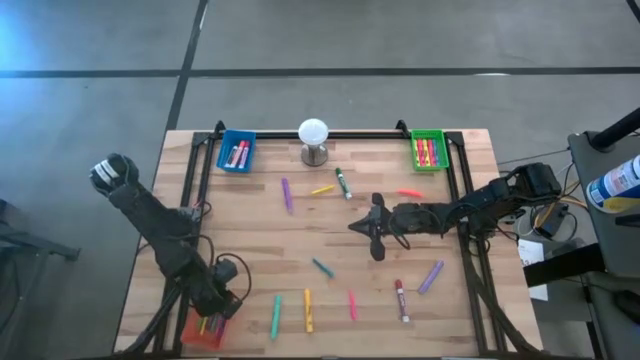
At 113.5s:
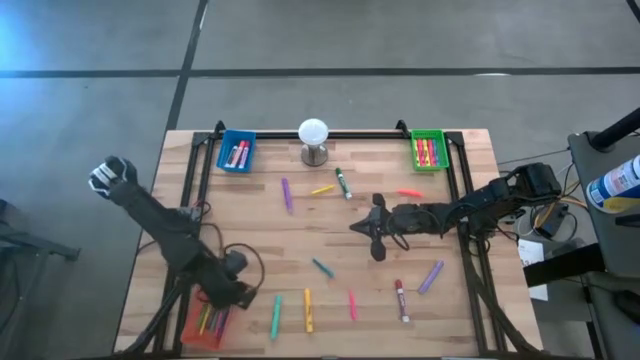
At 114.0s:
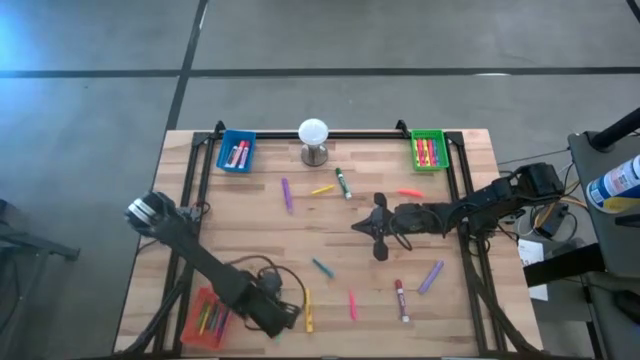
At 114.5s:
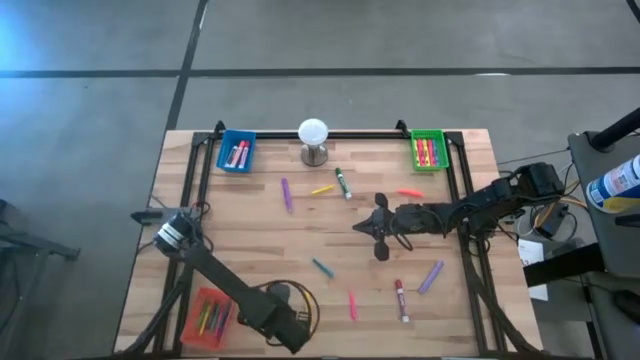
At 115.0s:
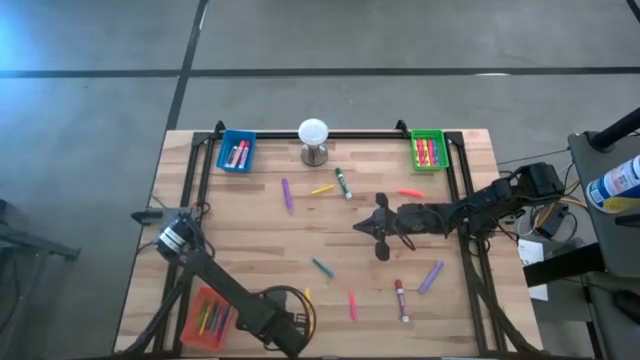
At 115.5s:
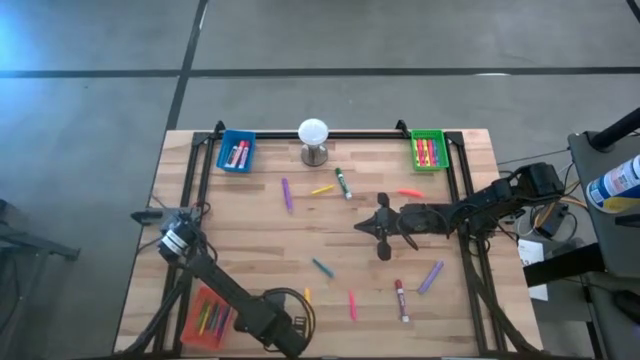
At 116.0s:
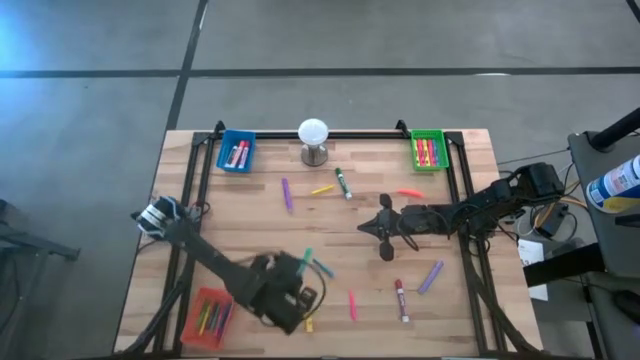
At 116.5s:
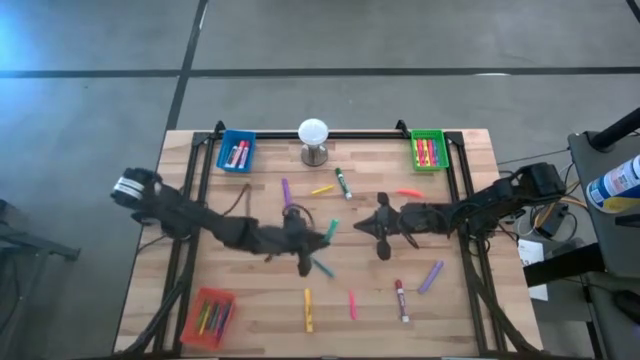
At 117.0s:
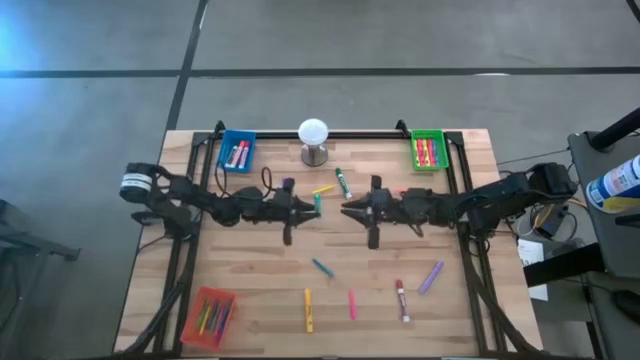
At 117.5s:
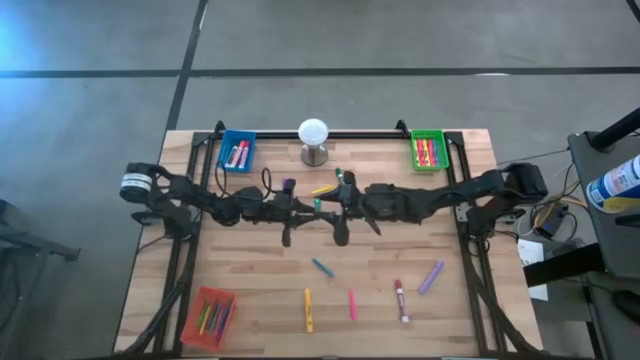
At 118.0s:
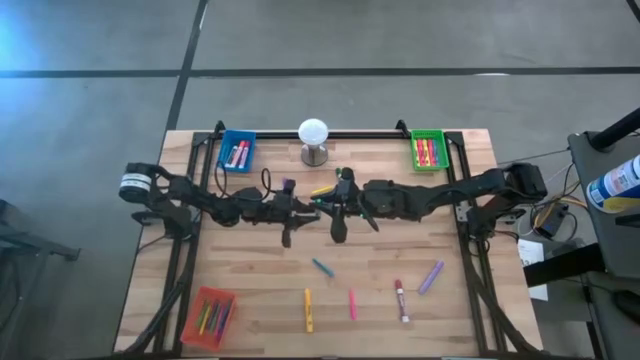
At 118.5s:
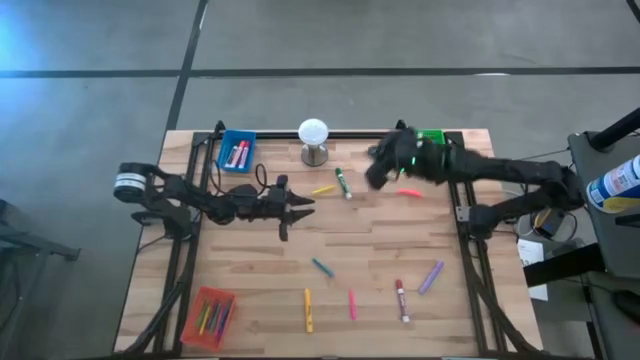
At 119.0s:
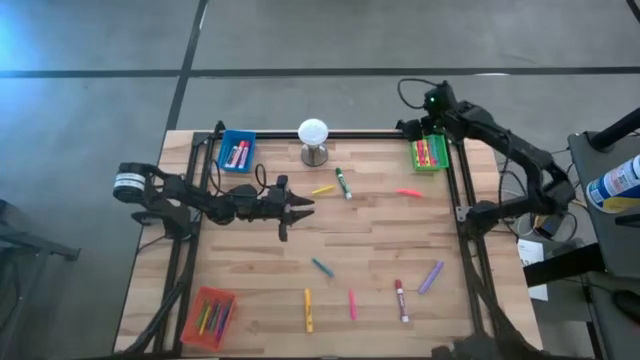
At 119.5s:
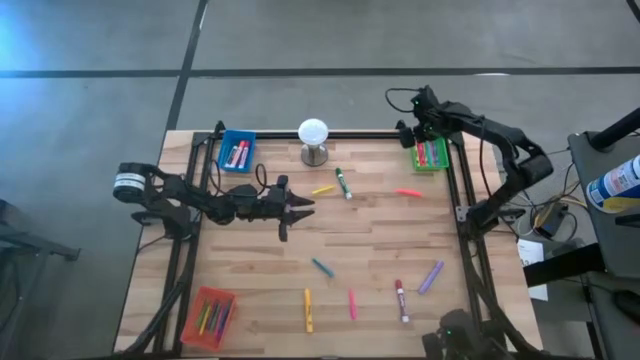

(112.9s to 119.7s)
Task: Pick & Place Markers
Put the light blue highlighter pen into the green bin

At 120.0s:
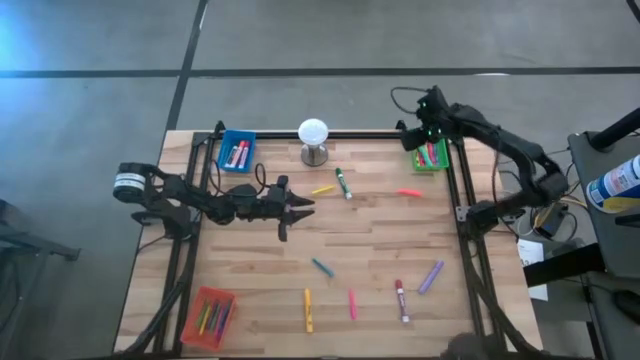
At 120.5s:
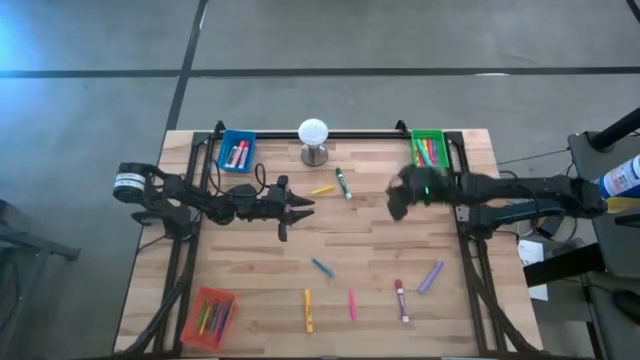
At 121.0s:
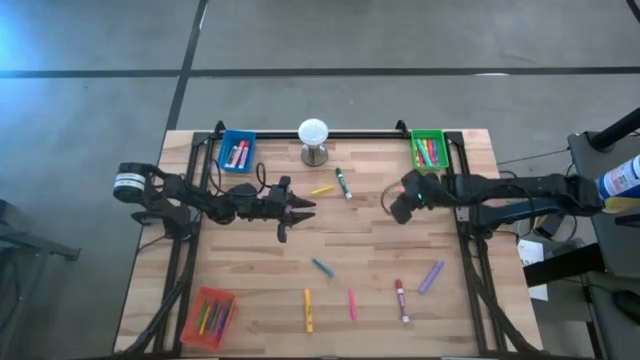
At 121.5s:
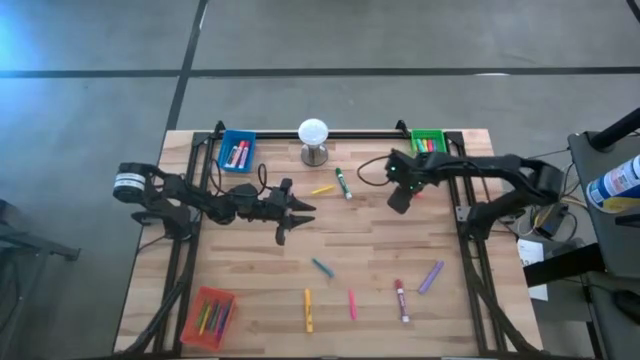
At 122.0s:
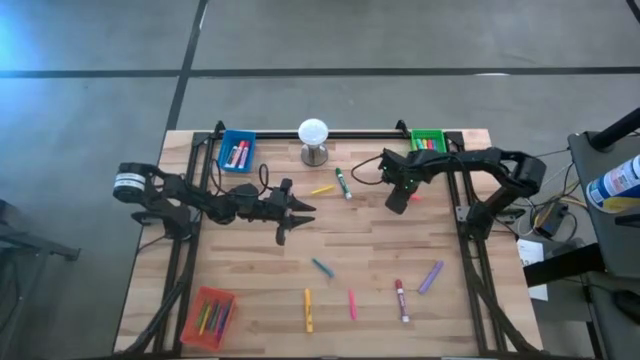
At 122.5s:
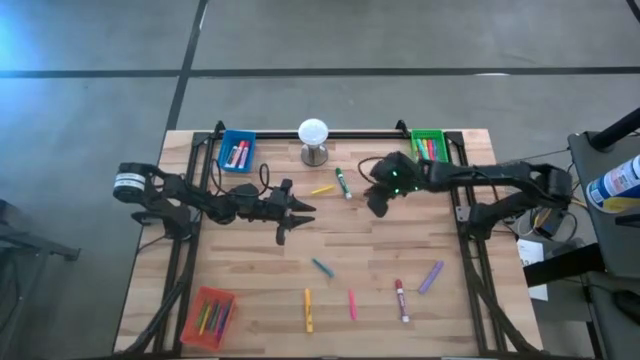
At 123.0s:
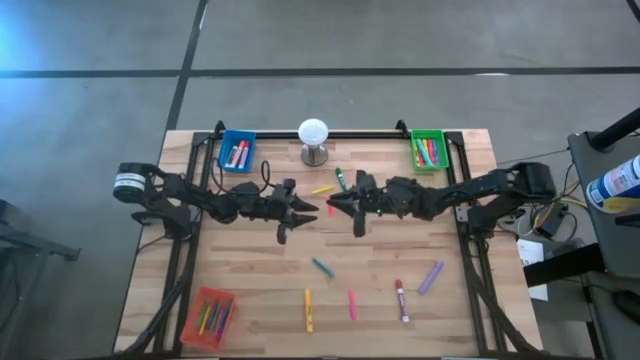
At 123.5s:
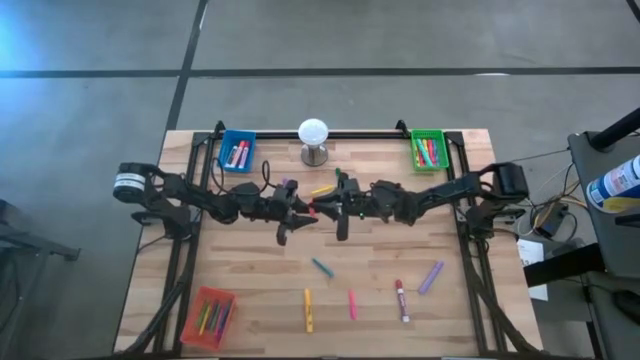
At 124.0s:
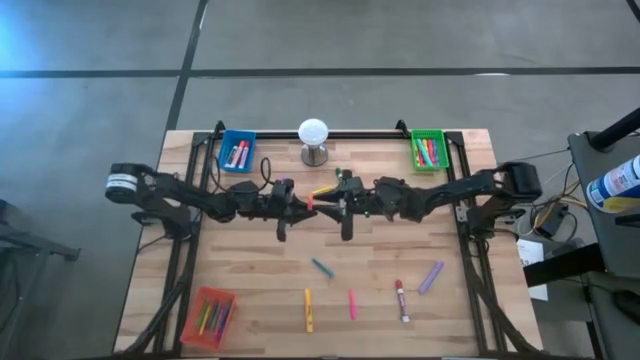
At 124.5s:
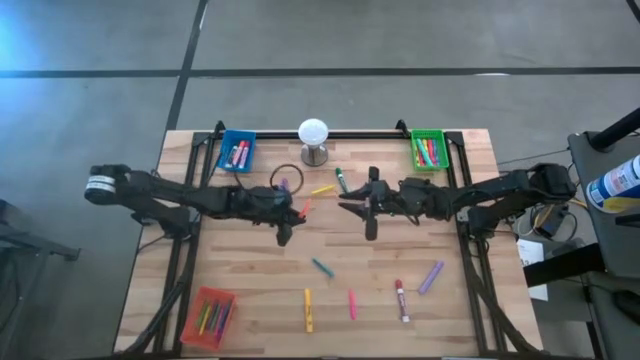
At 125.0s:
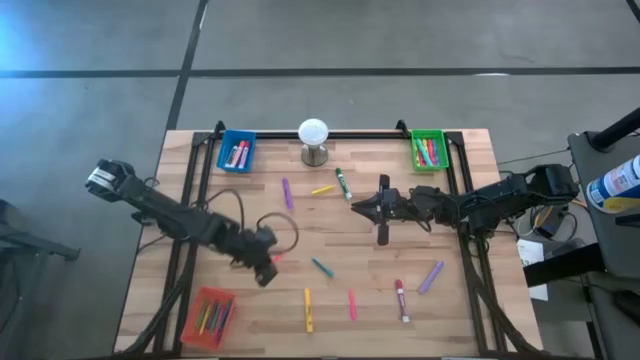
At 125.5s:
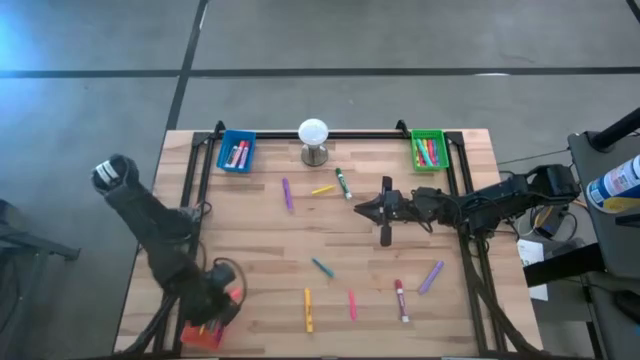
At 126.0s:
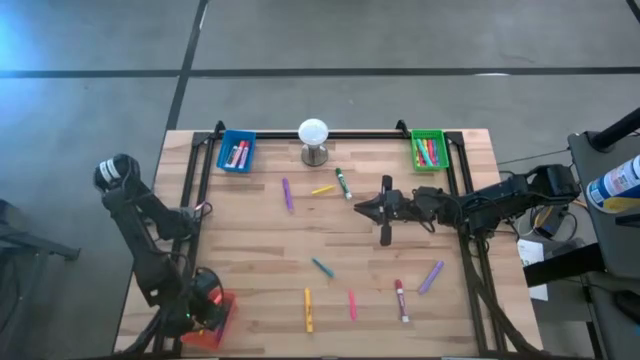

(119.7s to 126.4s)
Put the orange pen into the orange bin

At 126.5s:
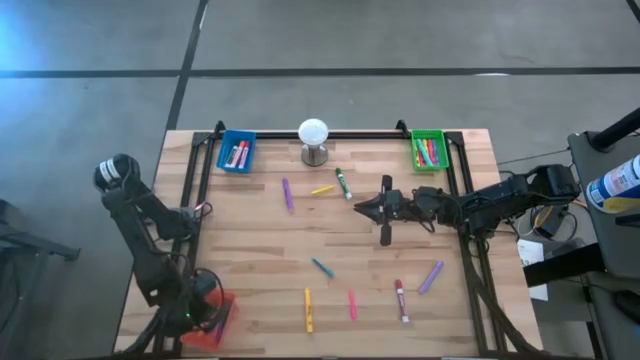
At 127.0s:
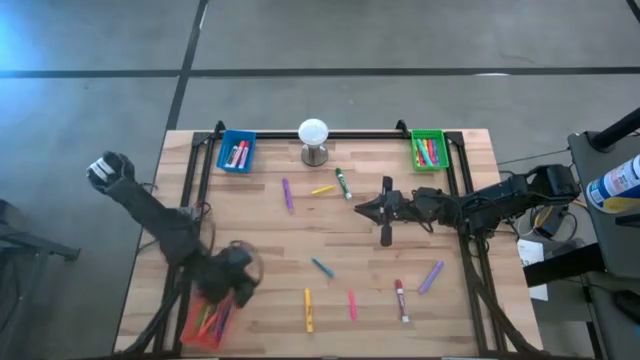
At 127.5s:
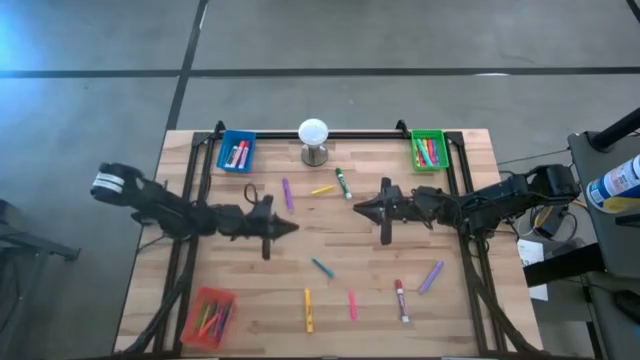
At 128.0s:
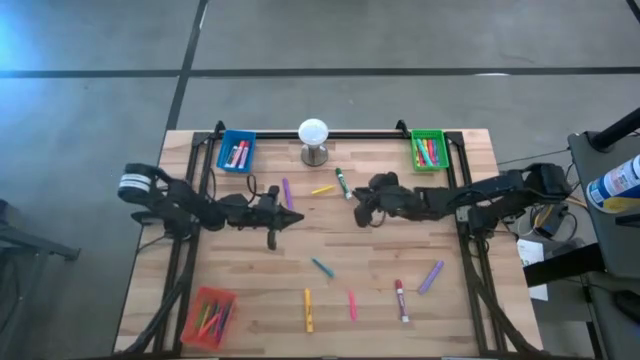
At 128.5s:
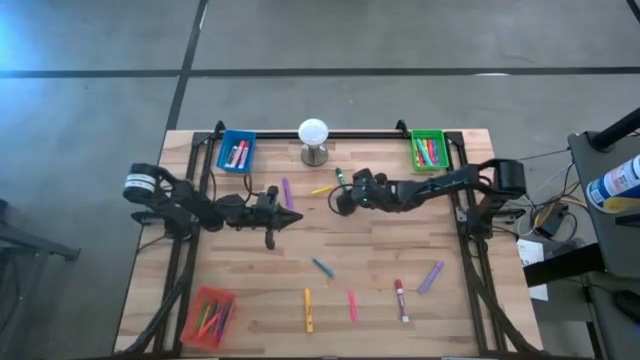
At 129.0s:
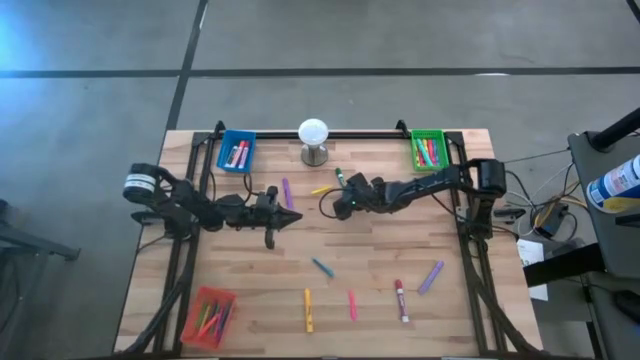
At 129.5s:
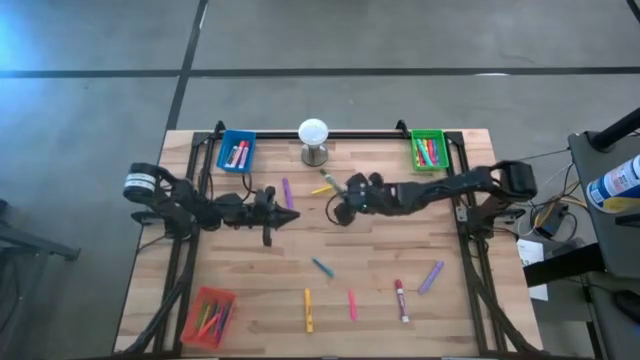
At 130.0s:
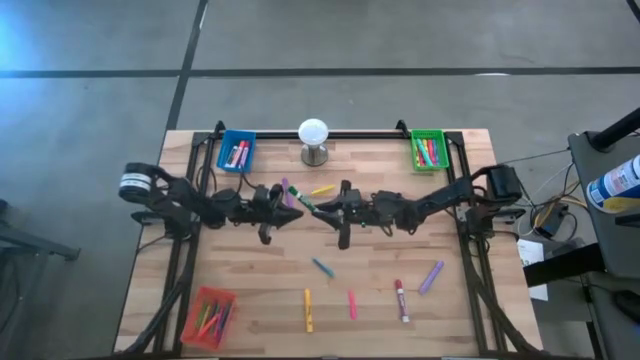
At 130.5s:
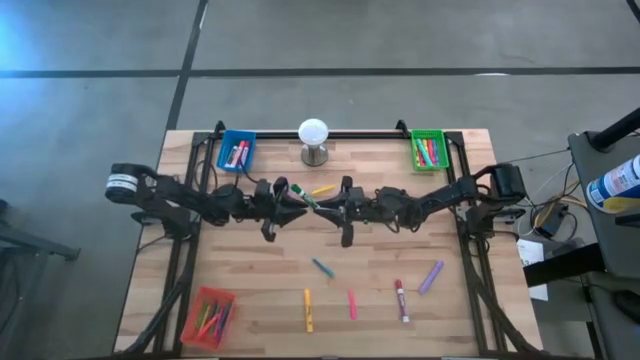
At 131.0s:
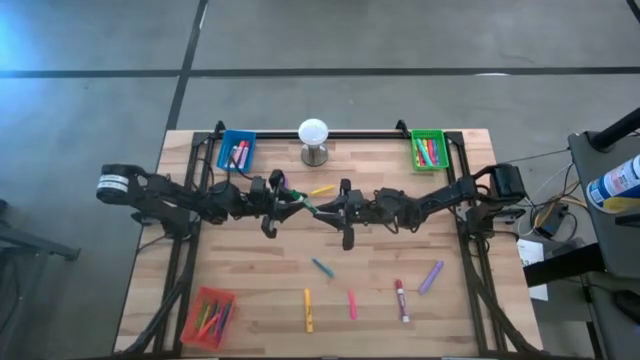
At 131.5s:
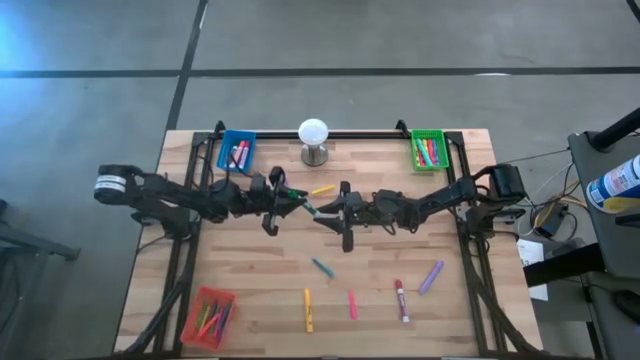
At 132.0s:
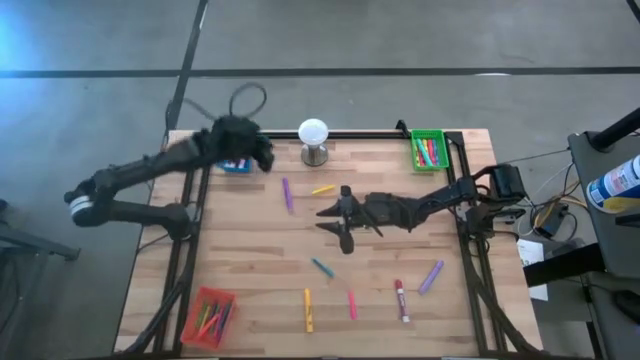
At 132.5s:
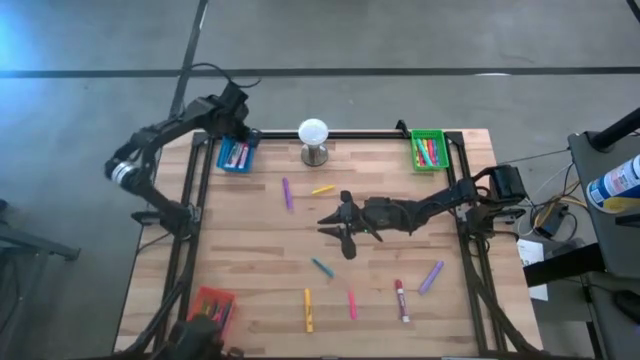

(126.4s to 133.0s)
Put the green marker pen into the blue bin

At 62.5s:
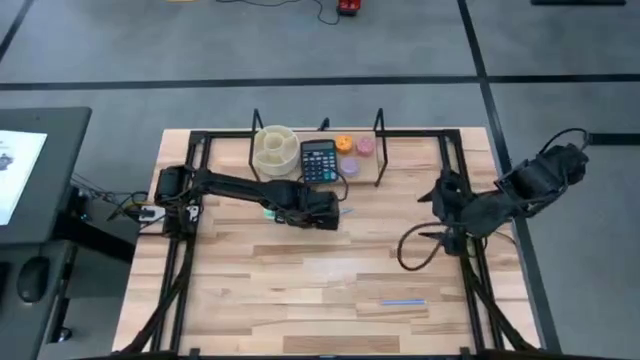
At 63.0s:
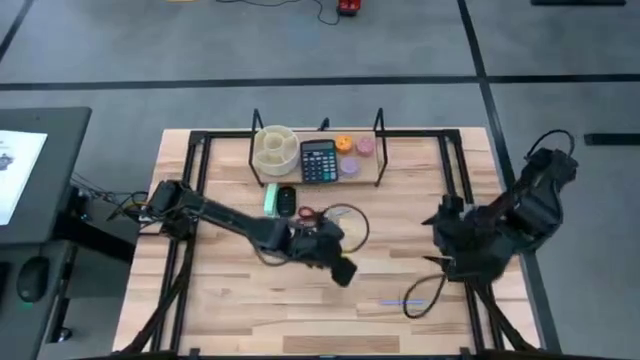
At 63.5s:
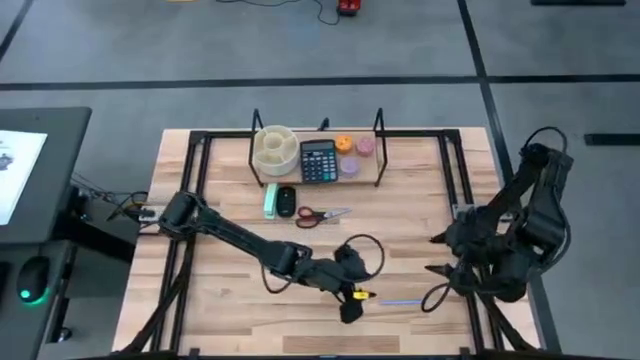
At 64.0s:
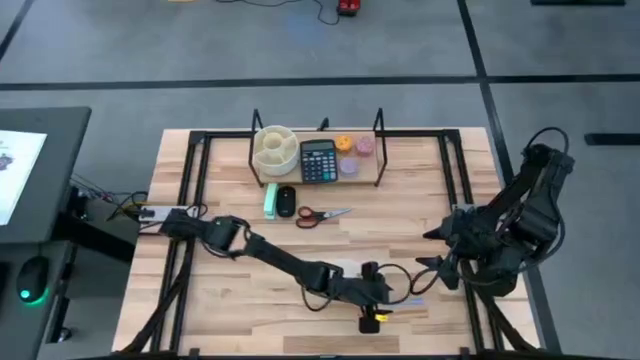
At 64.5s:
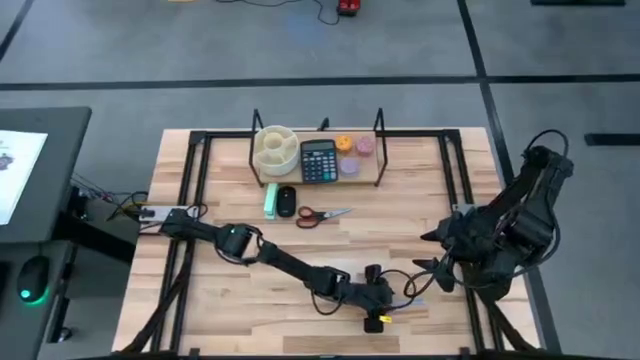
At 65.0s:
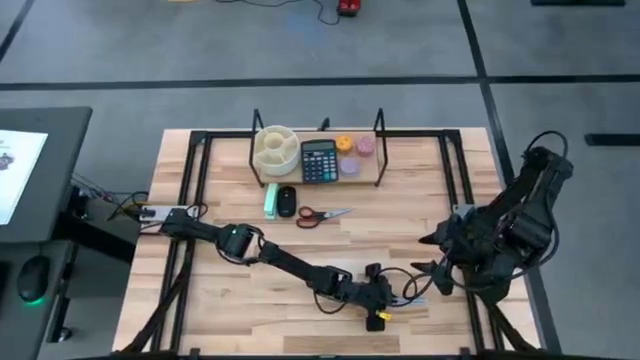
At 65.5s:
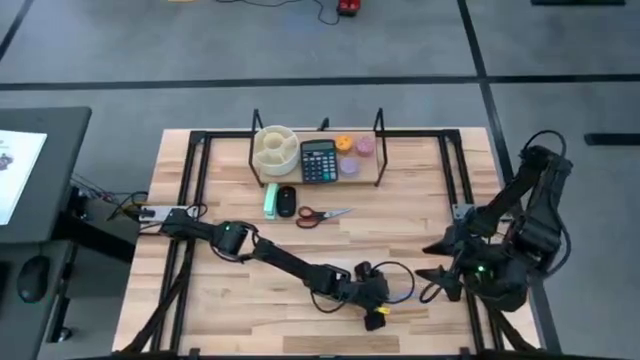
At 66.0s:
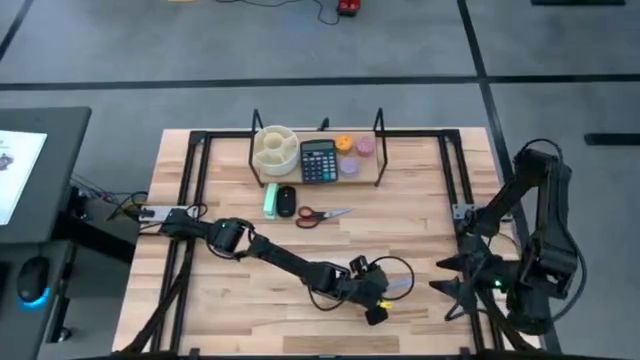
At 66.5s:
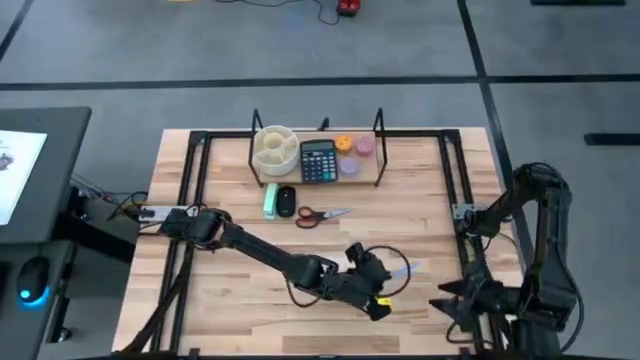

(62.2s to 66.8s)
Task: Stock shelves
Put the gray pen into the white pen organizer on the shelf
